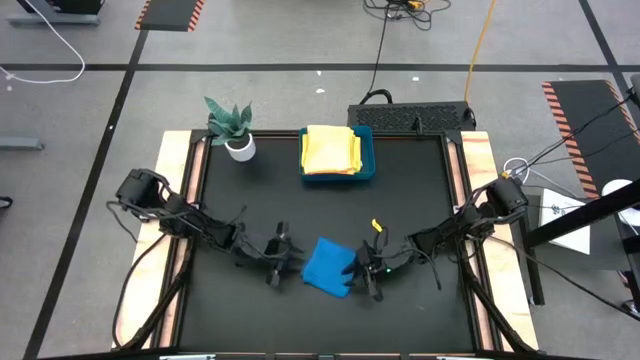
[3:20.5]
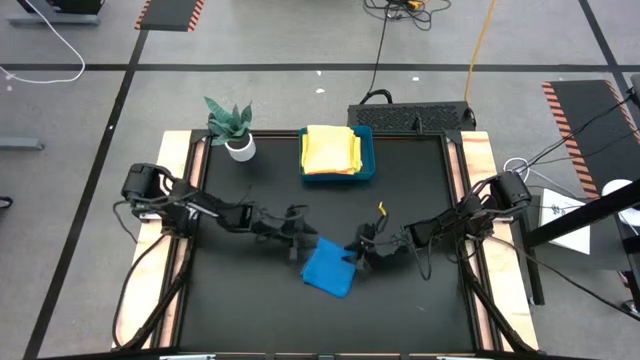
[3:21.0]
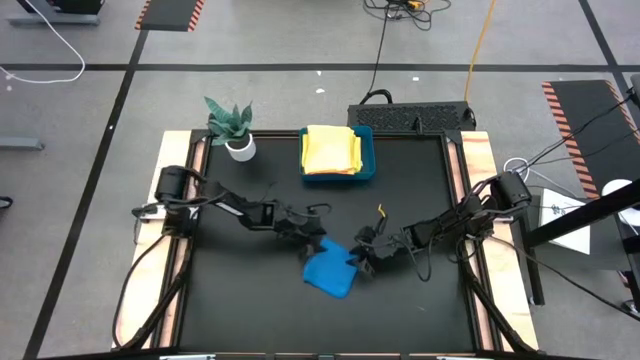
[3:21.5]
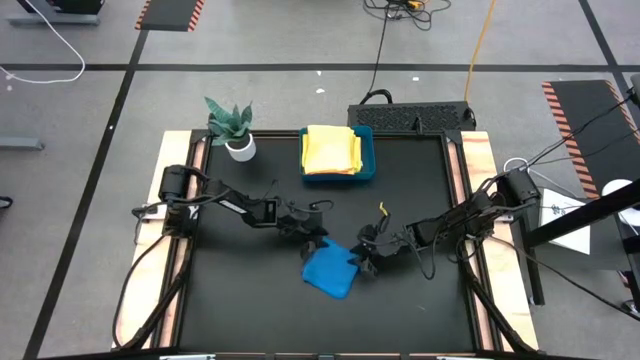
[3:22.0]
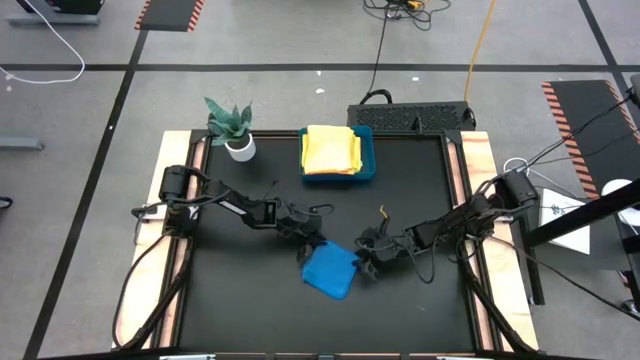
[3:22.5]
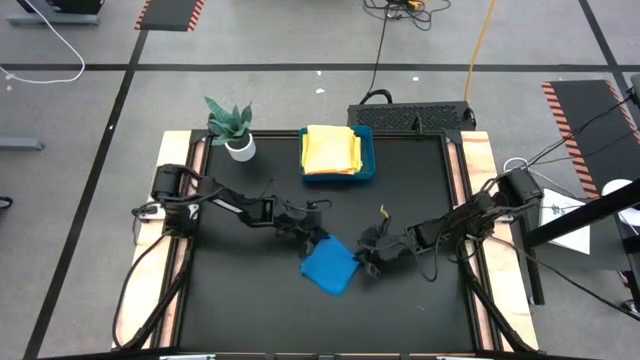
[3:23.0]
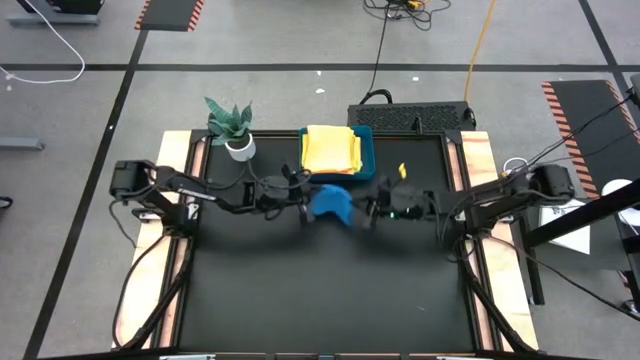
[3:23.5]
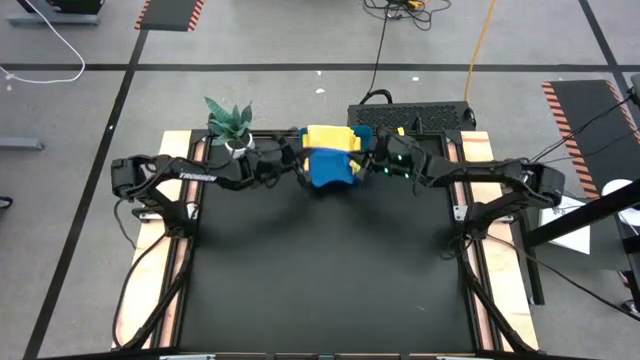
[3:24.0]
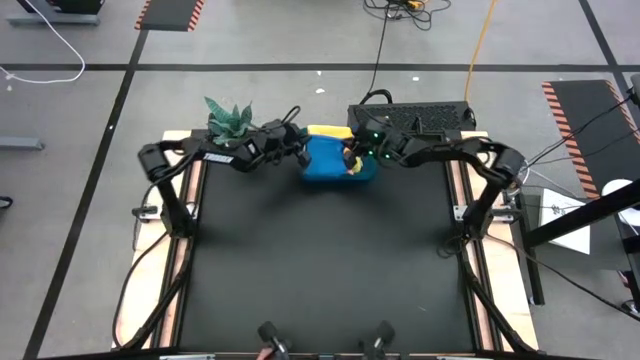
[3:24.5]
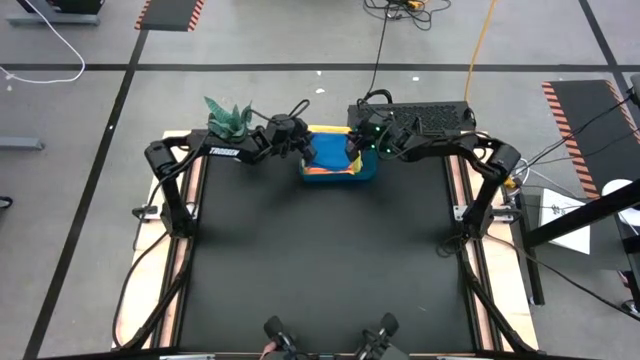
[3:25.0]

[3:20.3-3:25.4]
Task: Fold microfiber towels
Put the folded blue microfiber cloth into the blue bin

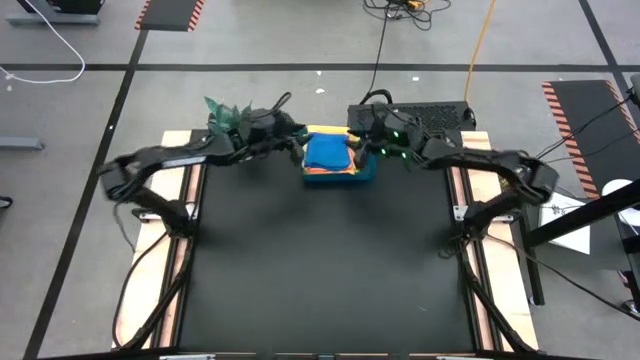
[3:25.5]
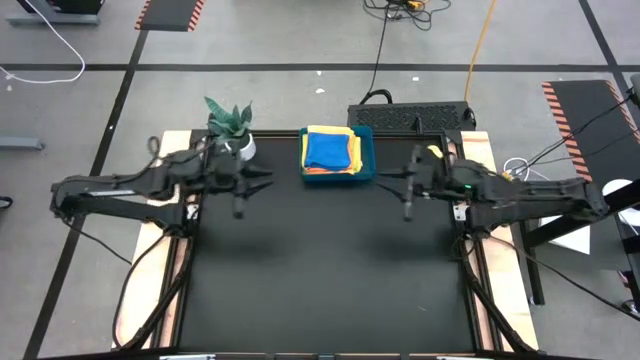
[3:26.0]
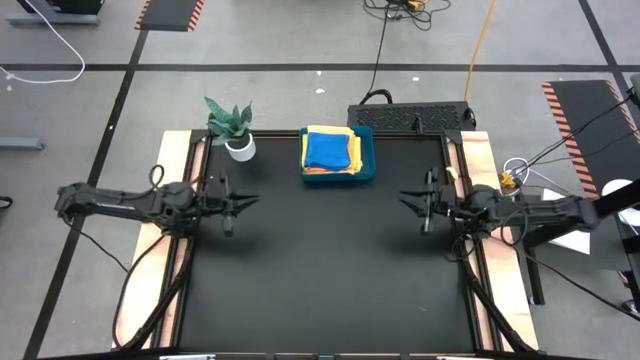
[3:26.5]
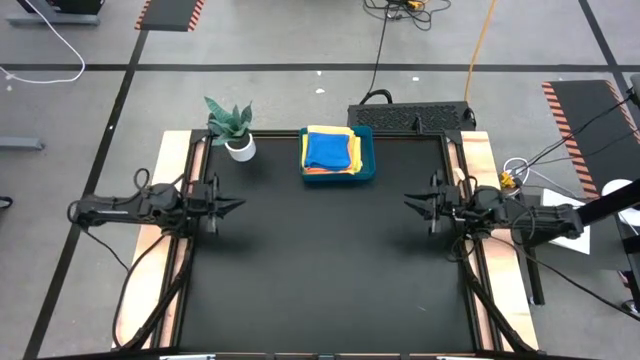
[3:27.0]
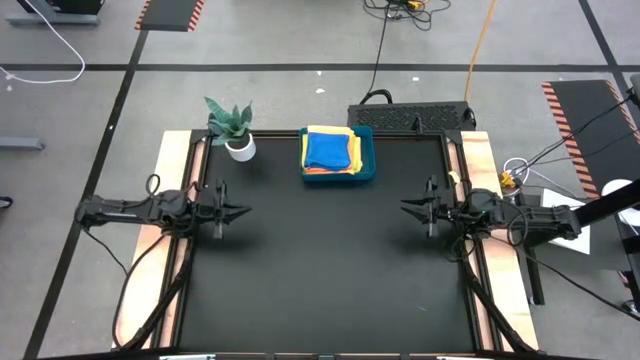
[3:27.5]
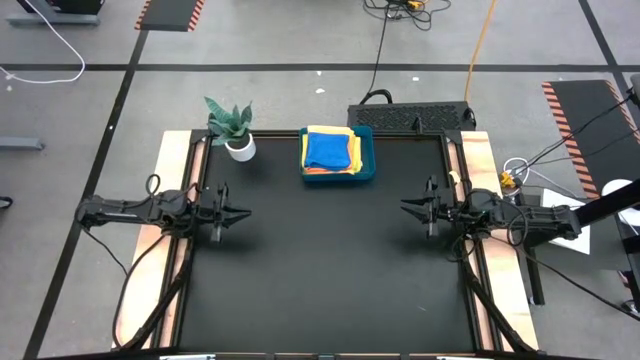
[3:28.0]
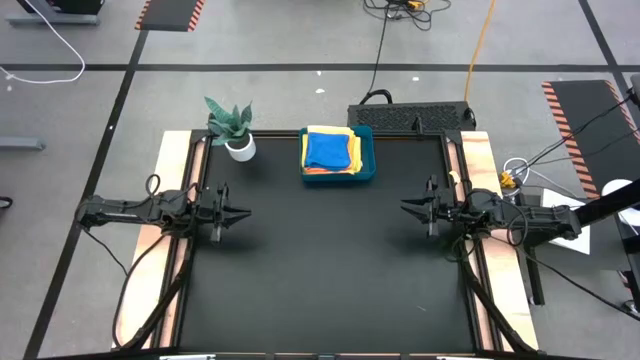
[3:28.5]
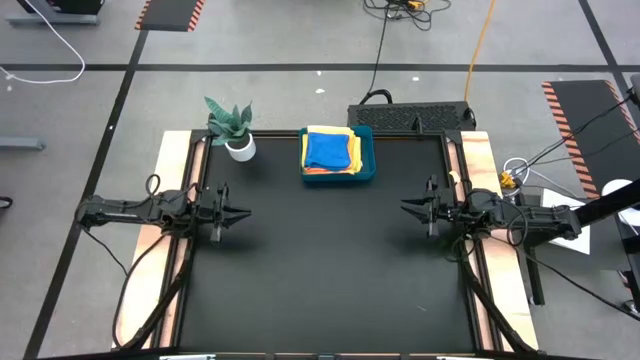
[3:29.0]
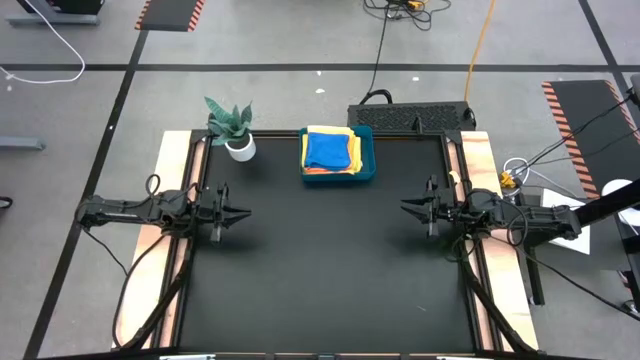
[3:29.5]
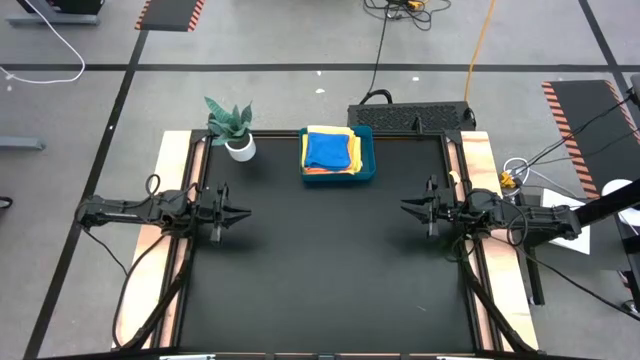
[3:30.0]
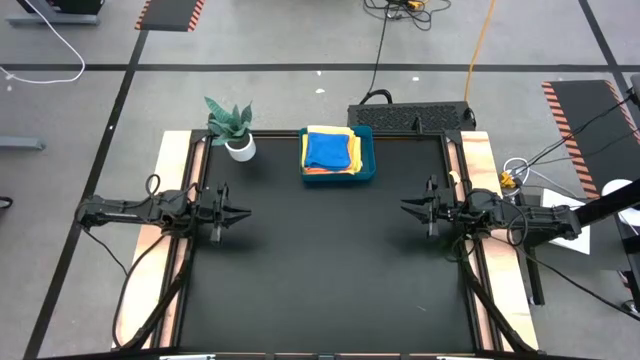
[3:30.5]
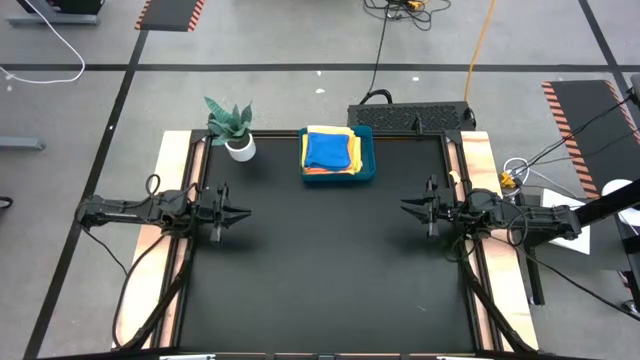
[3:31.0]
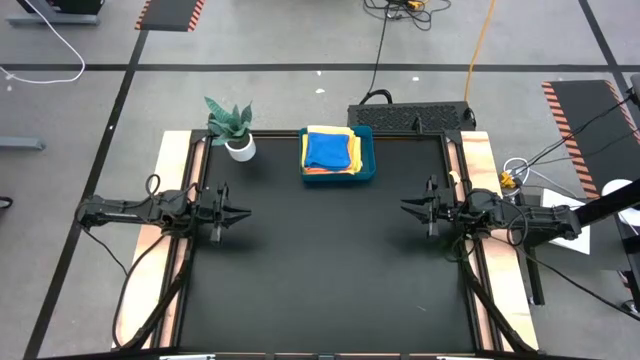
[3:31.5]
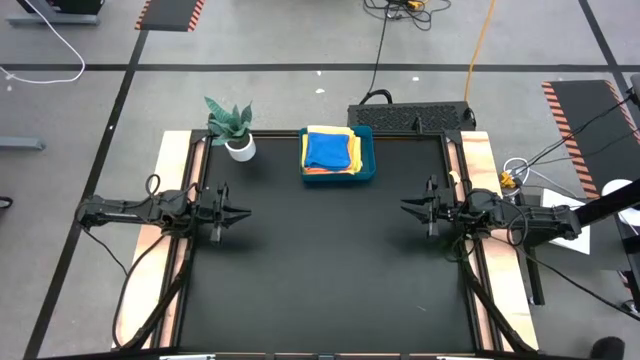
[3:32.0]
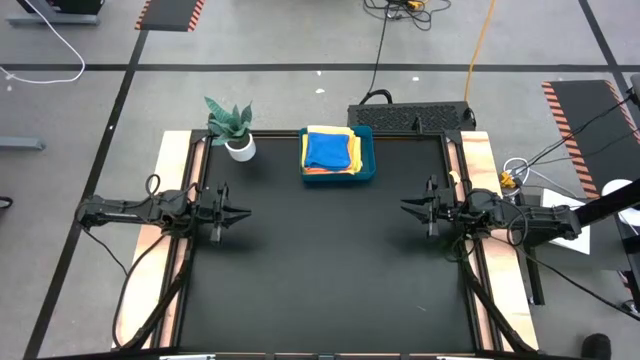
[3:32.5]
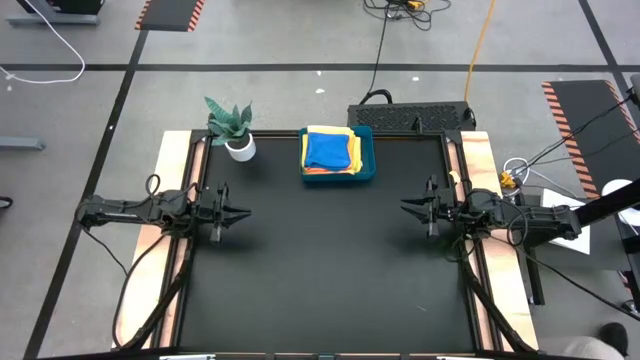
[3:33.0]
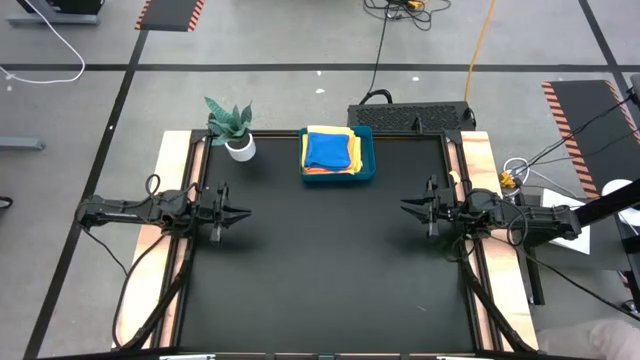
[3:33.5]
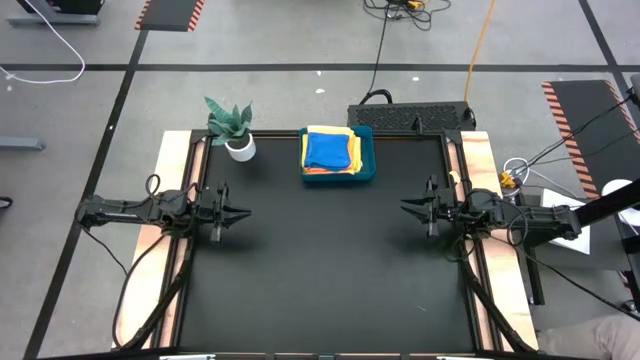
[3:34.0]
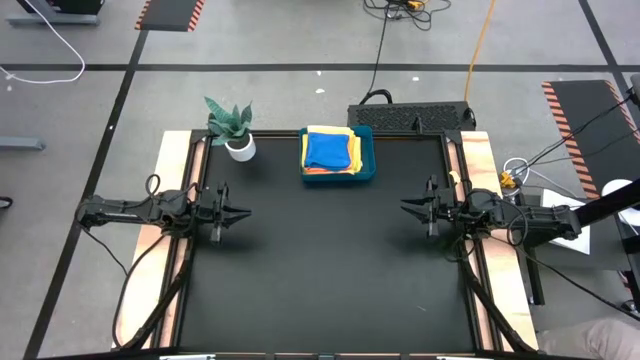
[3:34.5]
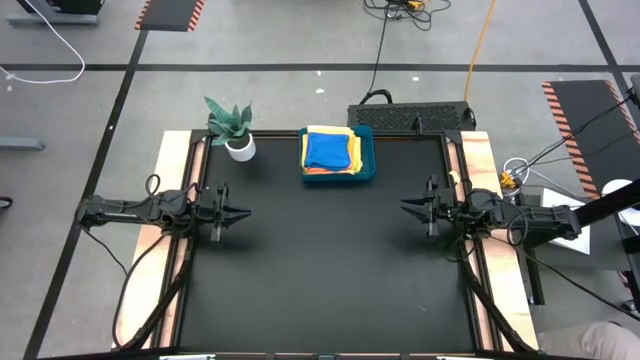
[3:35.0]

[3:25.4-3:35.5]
Return to Home Position

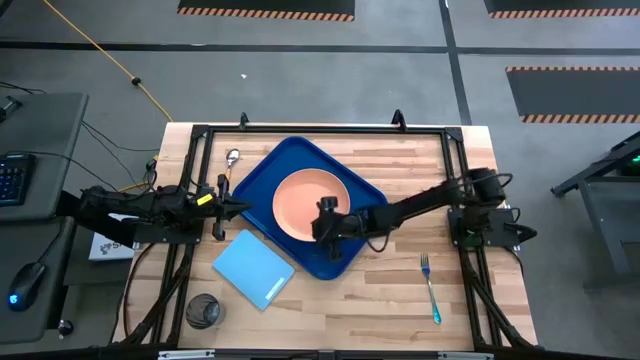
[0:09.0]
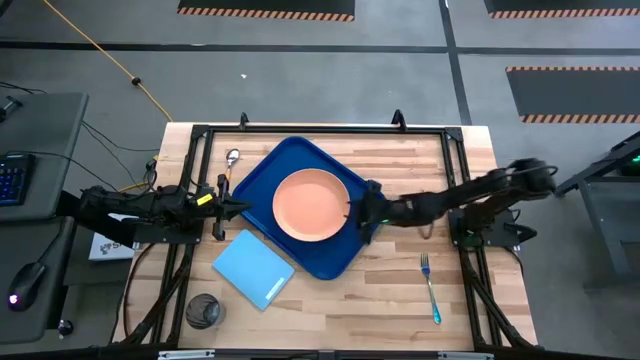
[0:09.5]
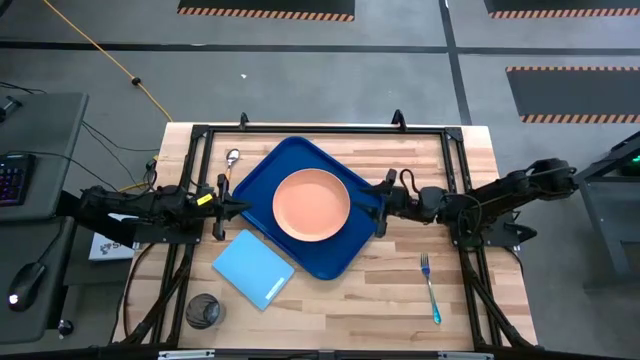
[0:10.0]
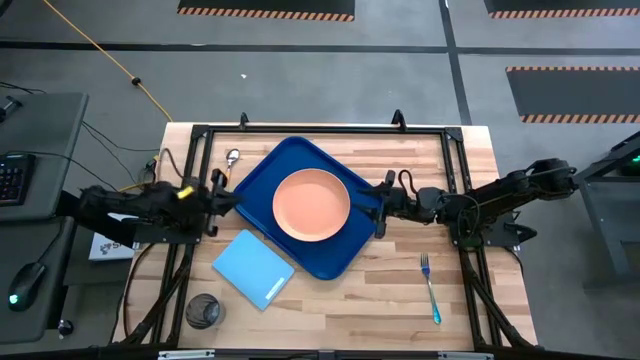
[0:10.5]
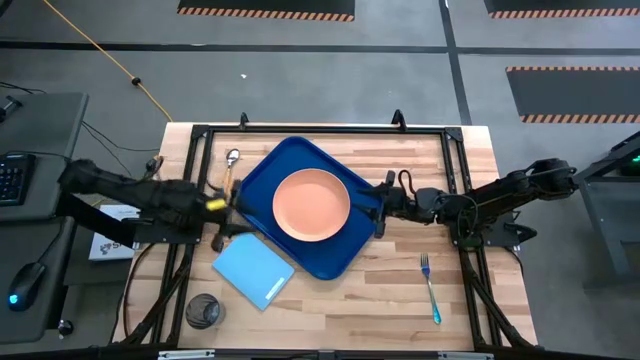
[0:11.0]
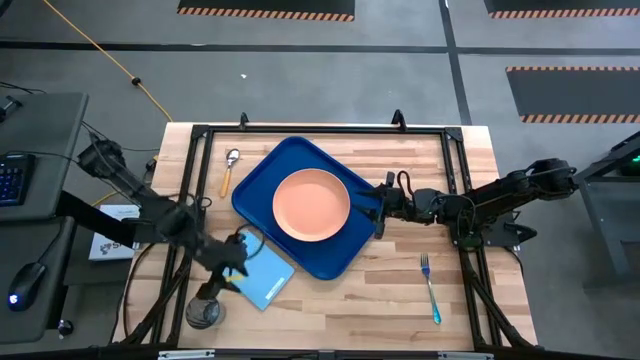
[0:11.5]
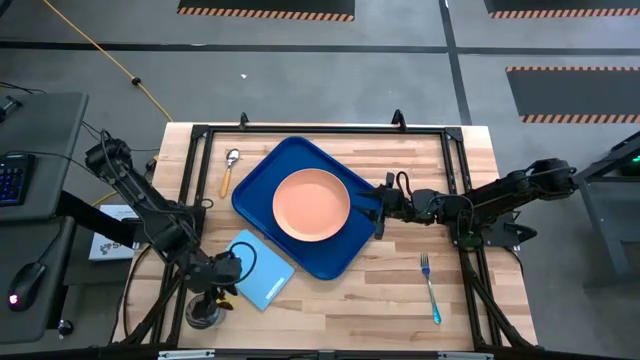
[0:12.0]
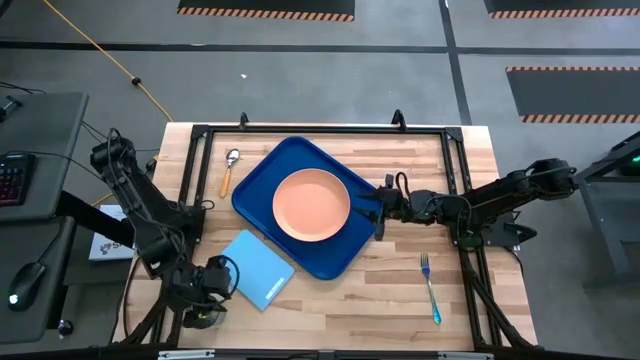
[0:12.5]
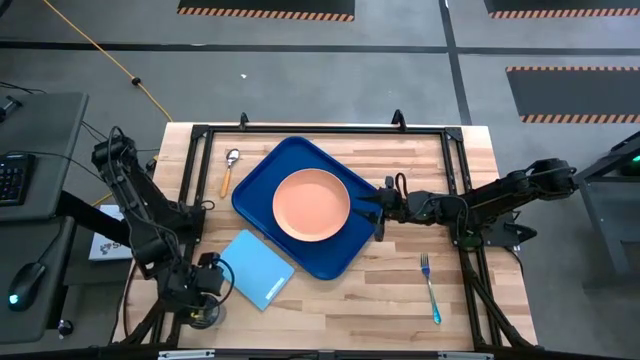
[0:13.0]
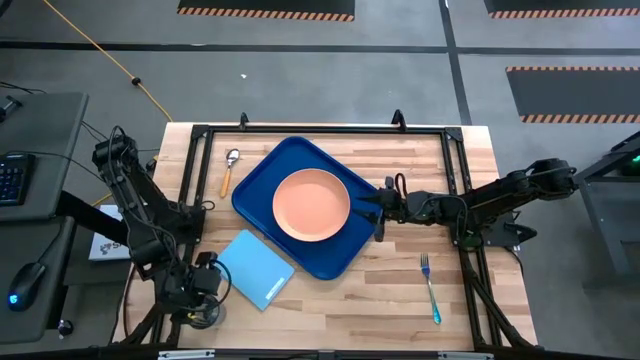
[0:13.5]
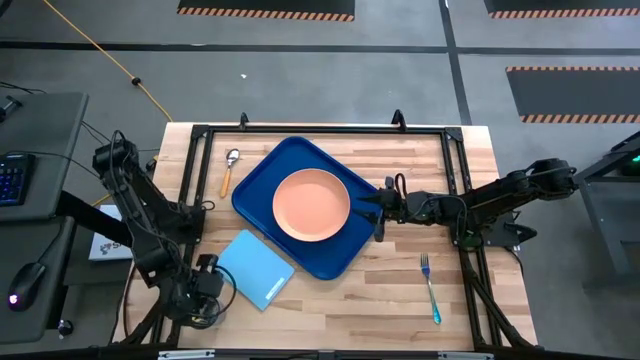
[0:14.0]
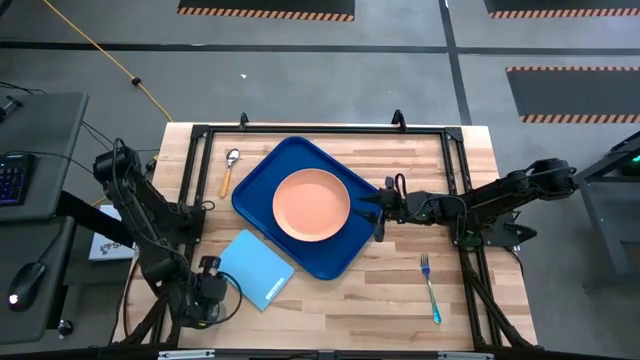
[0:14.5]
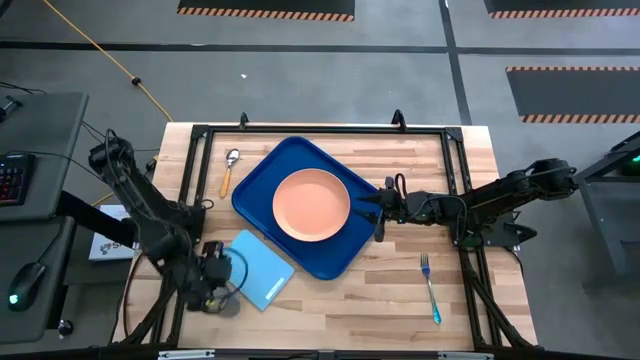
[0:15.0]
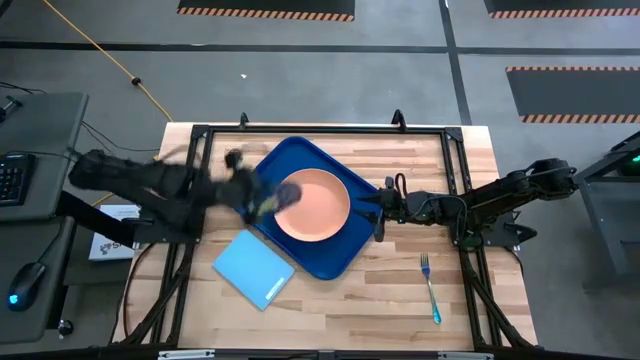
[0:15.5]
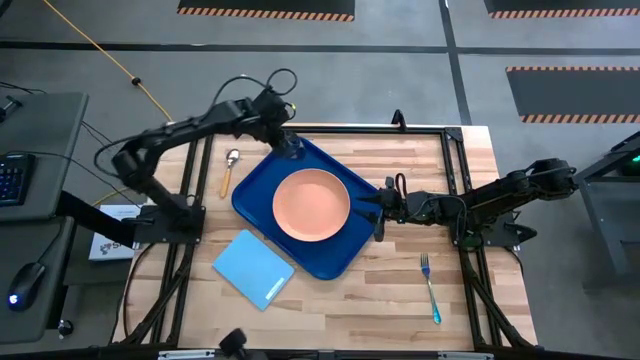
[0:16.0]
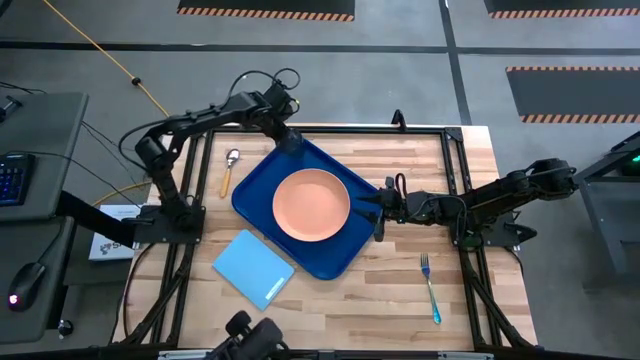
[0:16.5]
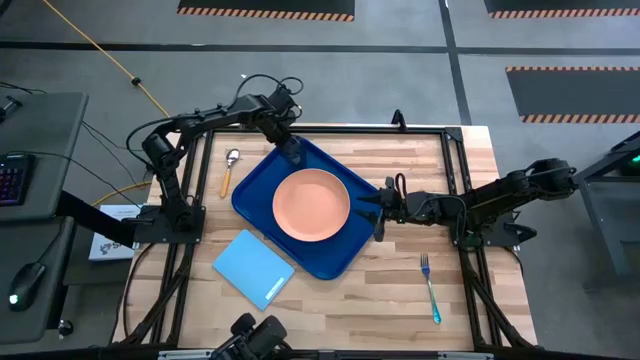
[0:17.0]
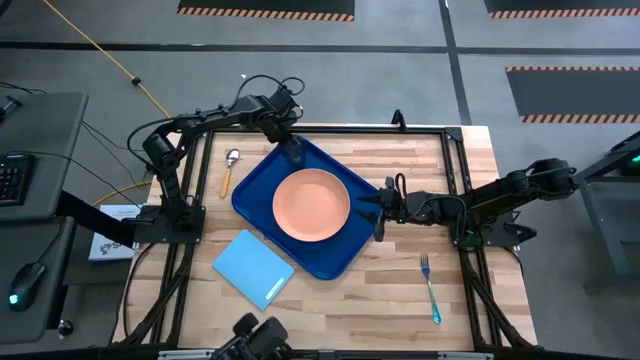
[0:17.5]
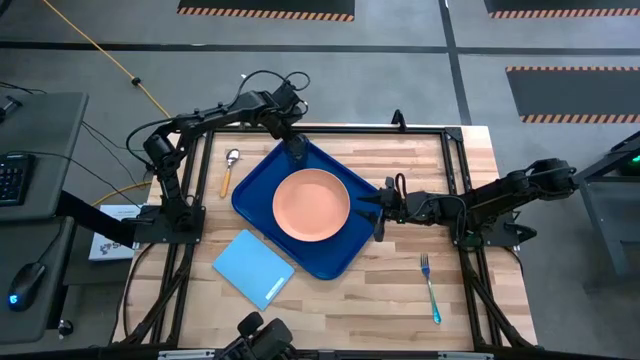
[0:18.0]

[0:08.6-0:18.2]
Task: Pick and place plate/cup/fork/spoon on tray
Put the blue glass on the blue serving tray to the top left of the light orange plate
